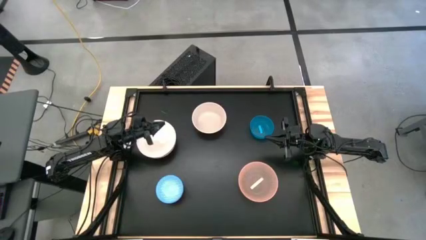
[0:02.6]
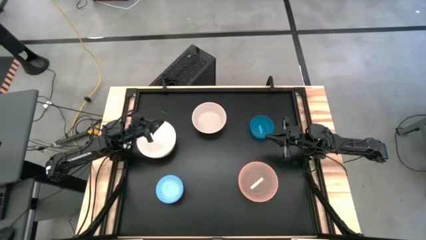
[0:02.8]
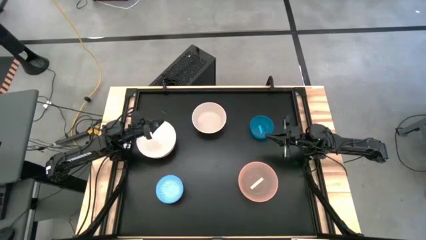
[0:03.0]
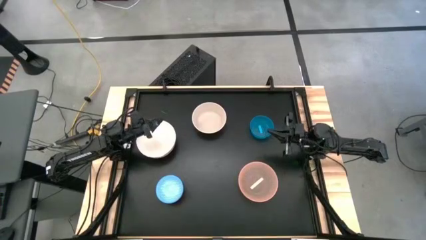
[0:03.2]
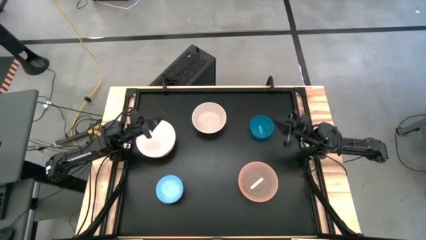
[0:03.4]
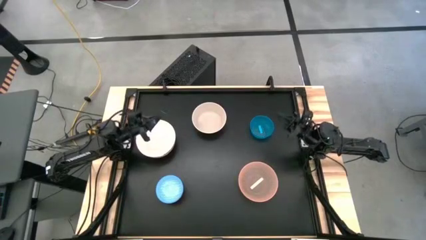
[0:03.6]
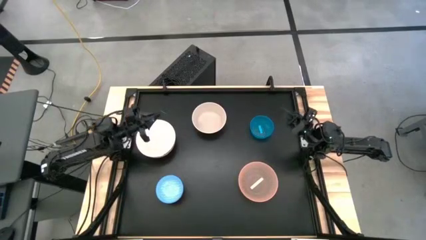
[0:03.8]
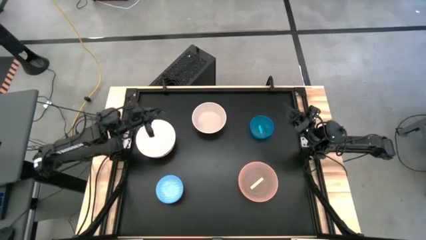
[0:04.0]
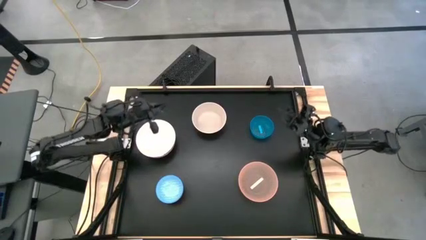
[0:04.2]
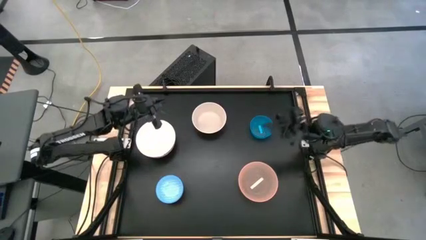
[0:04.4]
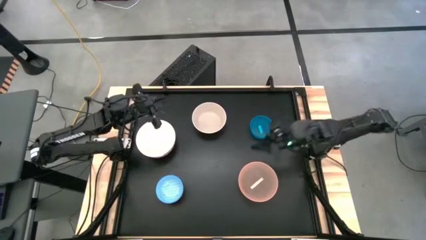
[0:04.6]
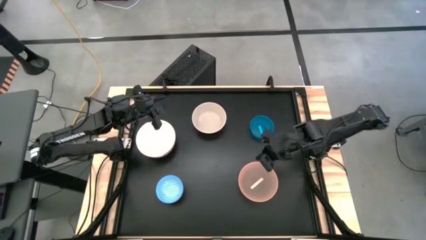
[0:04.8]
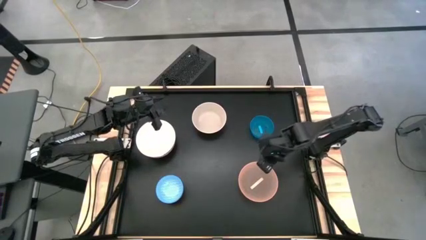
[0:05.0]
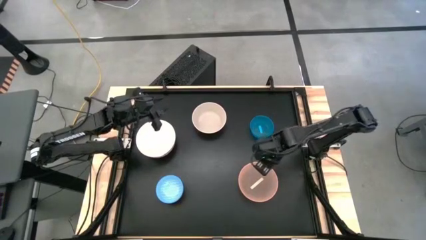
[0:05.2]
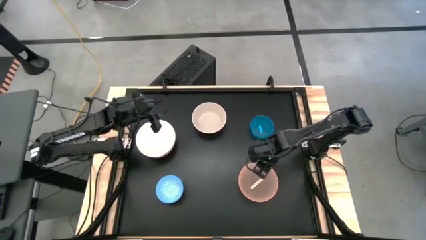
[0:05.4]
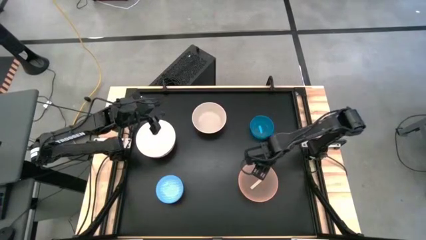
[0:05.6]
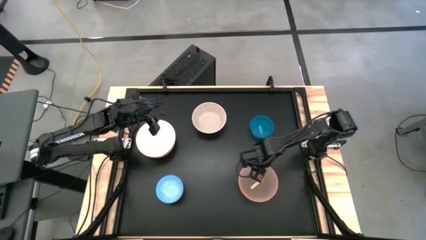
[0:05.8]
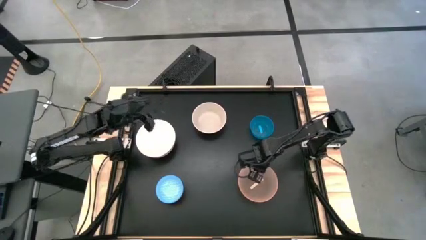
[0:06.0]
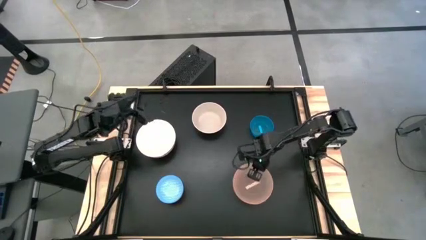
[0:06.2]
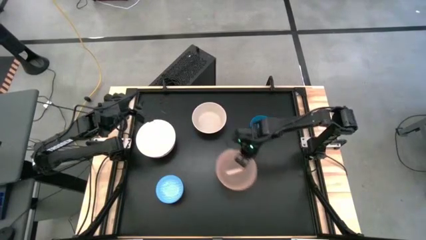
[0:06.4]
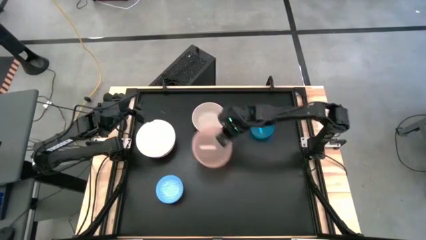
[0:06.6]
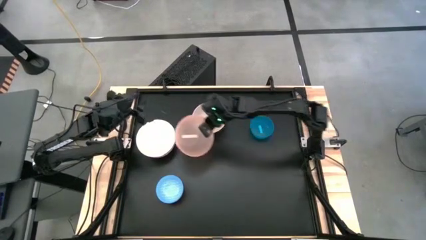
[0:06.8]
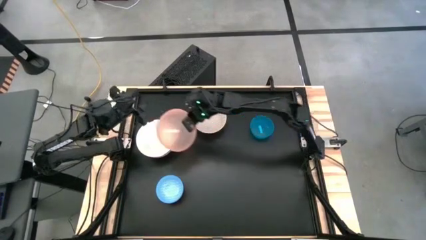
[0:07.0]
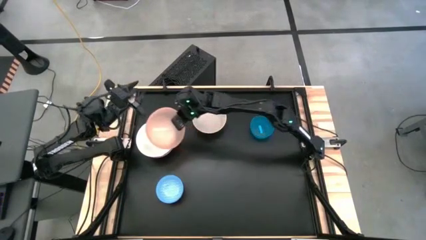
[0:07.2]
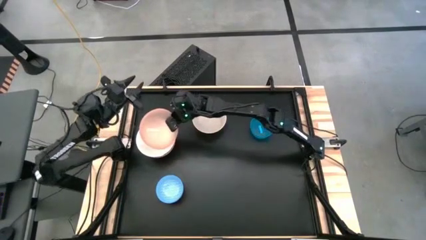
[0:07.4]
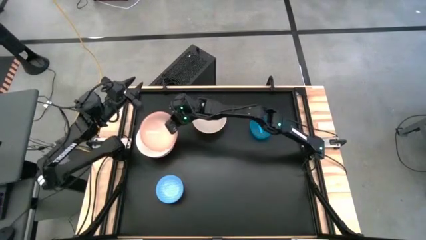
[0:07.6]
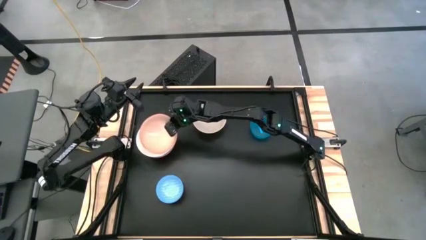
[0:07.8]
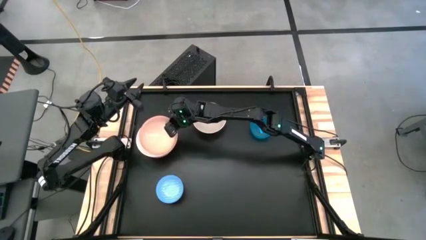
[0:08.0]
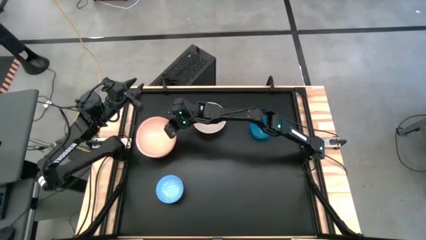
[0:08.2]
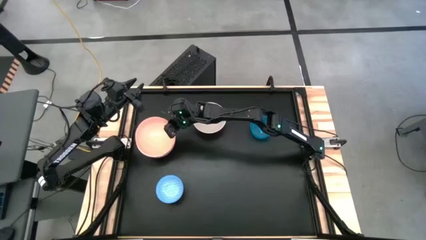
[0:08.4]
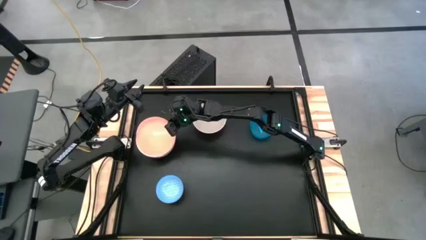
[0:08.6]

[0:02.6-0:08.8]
Stack the pink bowl on top of the white bowl

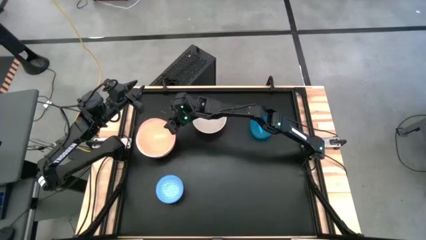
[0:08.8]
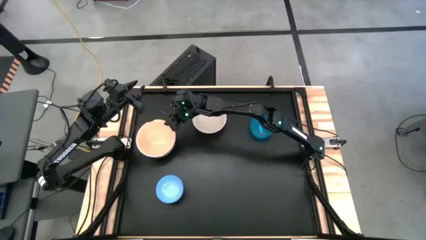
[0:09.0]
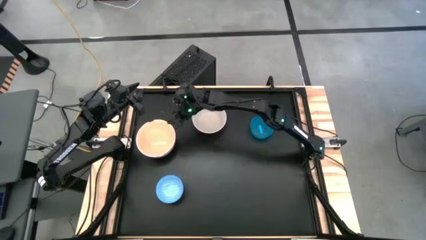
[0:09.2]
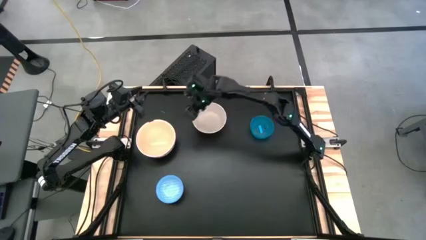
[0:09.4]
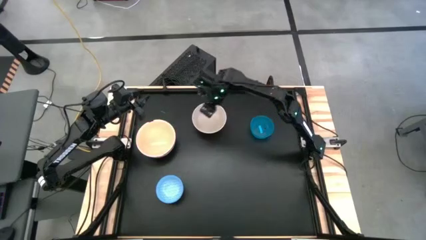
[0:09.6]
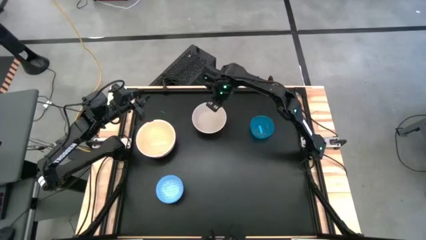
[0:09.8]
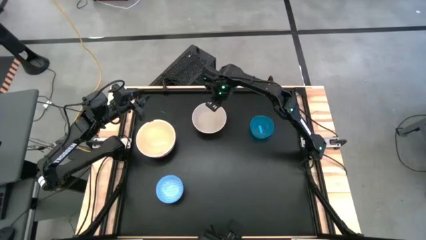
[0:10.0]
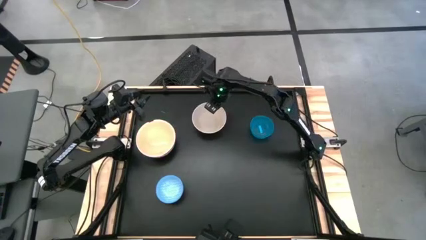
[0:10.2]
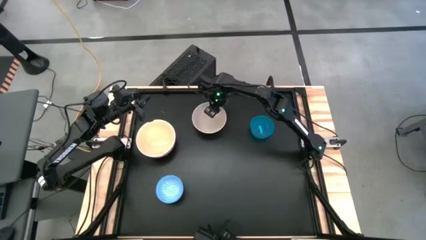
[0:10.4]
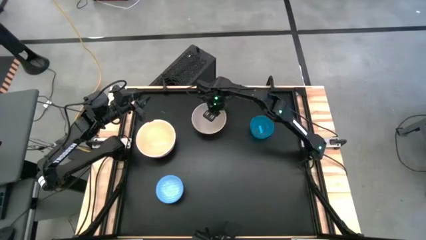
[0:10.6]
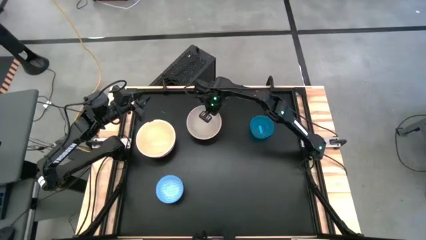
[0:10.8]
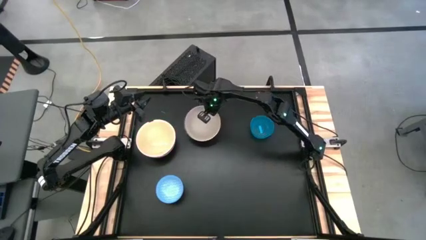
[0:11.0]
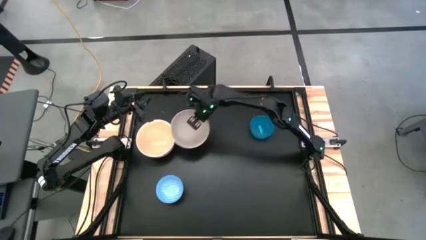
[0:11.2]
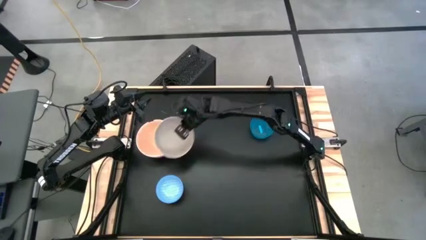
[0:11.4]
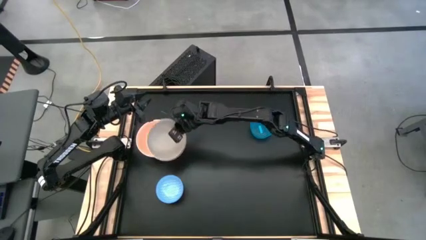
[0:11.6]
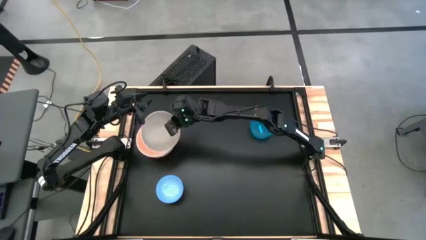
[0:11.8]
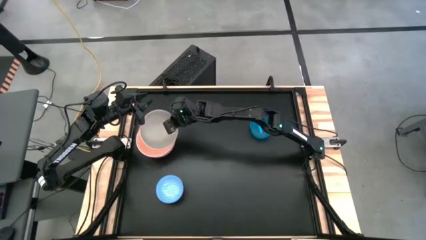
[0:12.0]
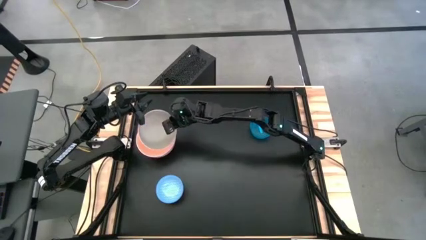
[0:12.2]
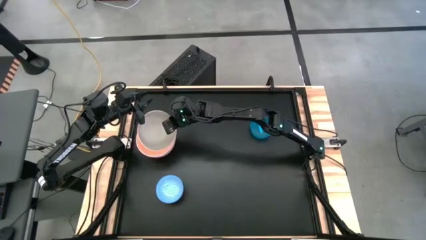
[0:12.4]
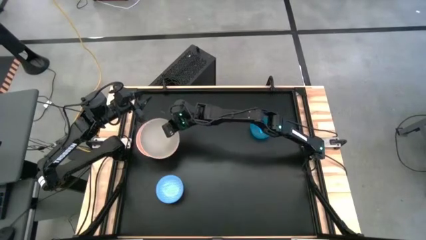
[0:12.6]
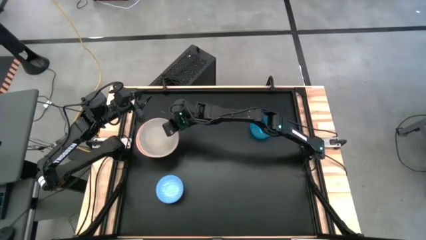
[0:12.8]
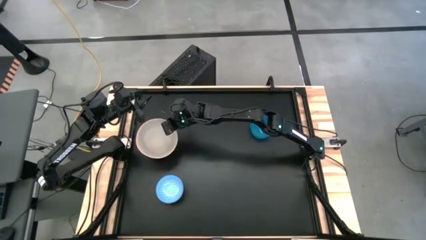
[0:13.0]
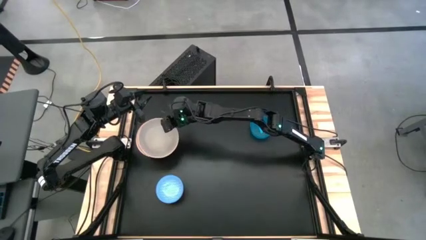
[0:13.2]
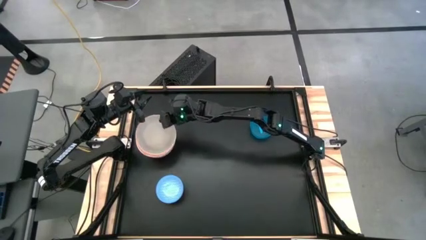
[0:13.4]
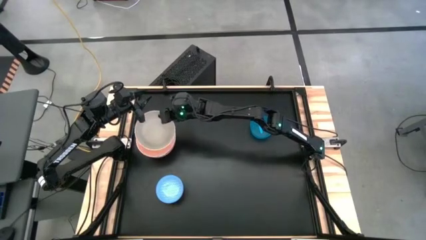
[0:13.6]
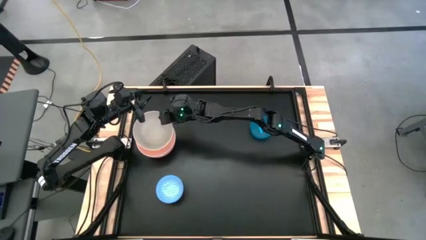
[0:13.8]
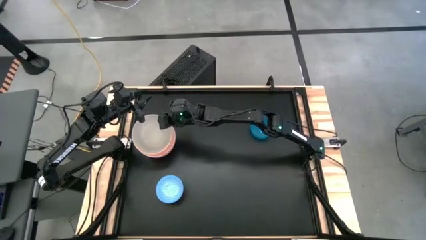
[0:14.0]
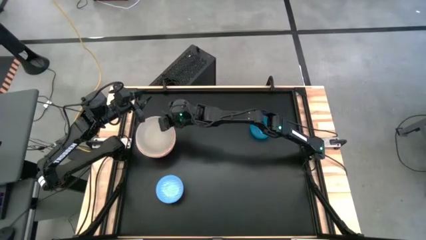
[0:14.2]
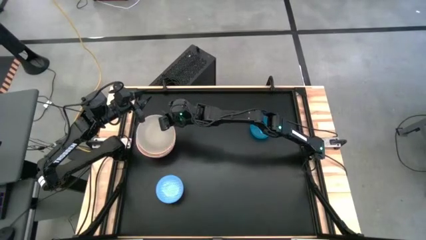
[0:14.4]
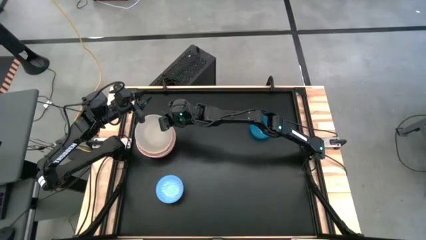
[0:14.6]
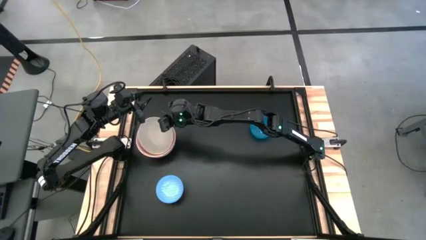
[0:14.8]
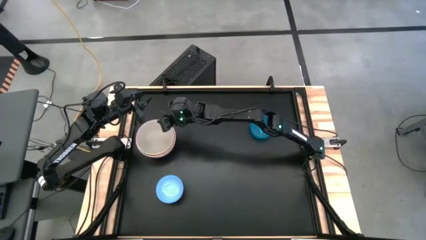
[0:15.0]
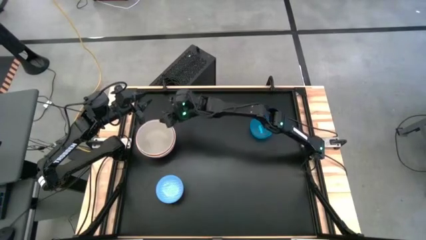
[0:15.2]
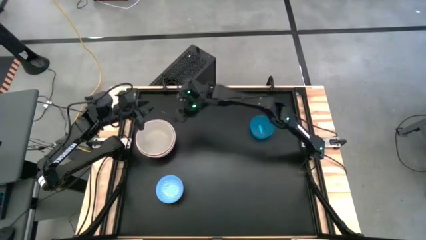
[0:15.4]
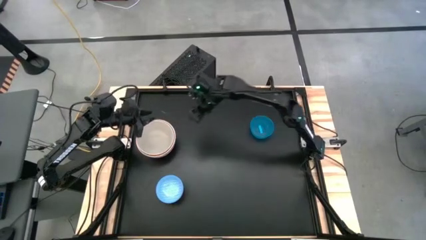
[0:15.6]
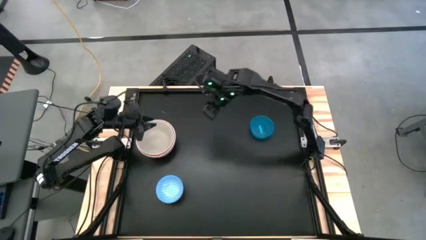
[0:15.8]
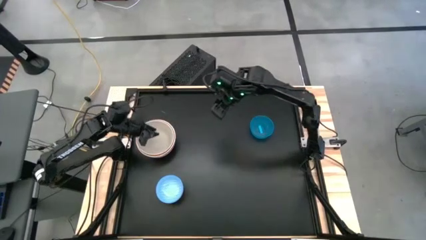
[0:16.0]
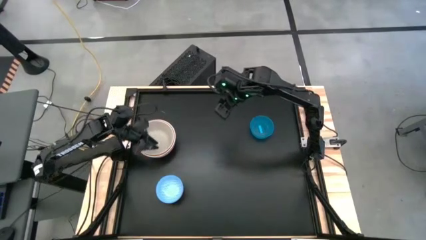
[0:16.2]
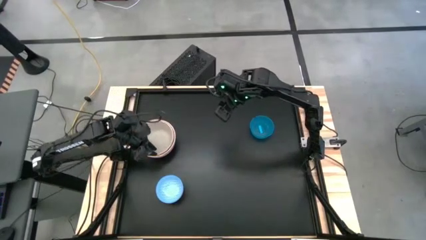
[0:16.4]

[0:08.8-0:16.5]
Stack the gray bowl on top of the pink bowl

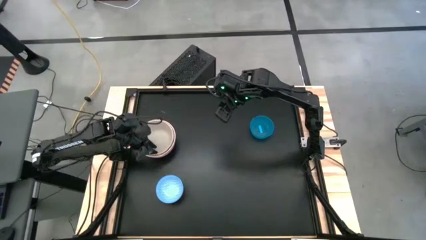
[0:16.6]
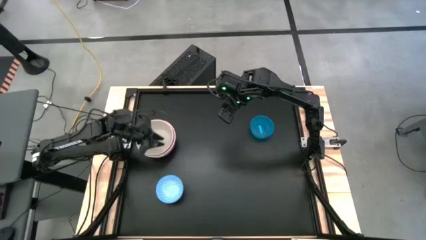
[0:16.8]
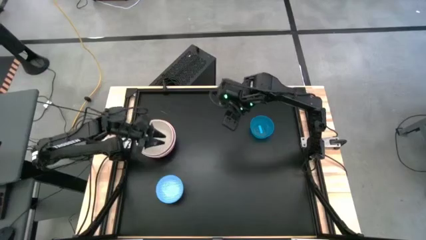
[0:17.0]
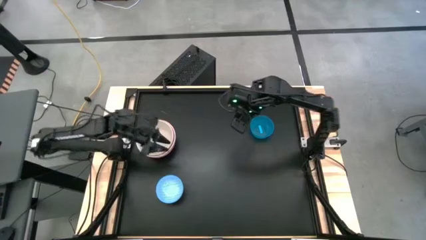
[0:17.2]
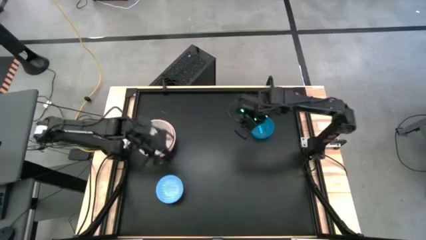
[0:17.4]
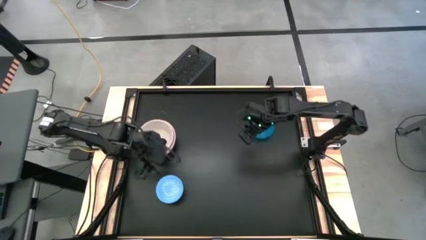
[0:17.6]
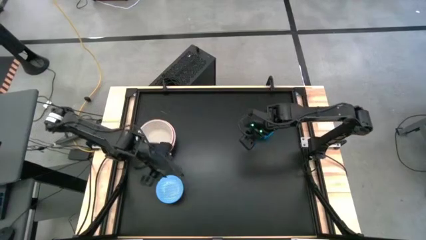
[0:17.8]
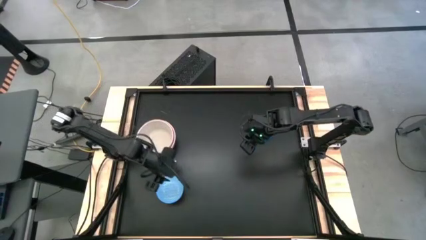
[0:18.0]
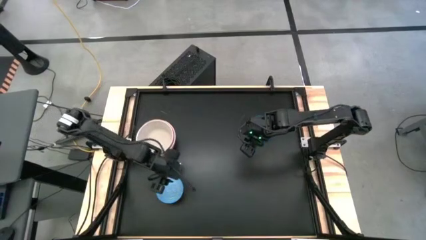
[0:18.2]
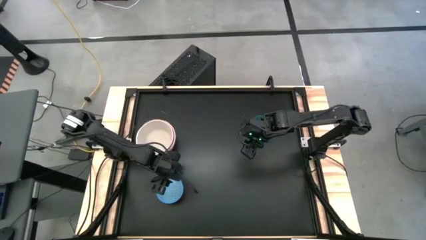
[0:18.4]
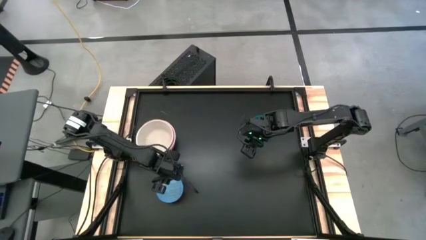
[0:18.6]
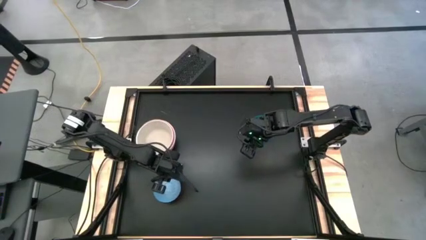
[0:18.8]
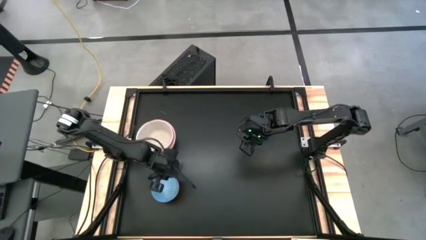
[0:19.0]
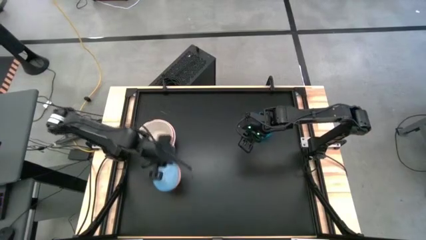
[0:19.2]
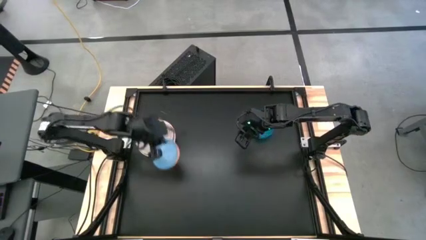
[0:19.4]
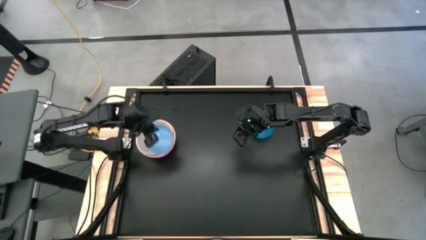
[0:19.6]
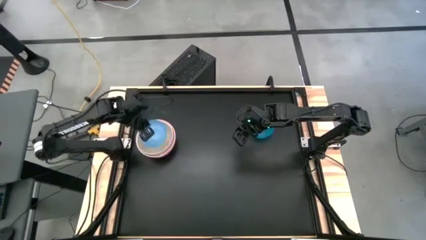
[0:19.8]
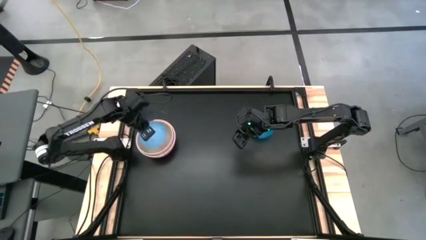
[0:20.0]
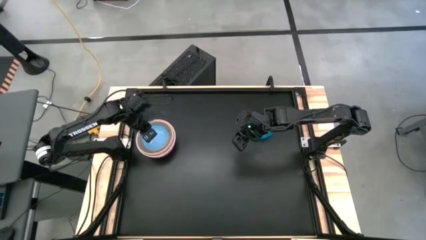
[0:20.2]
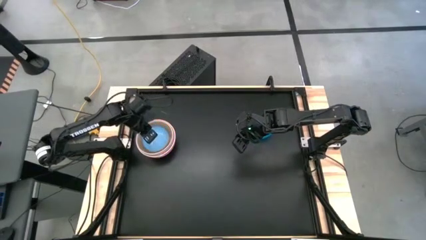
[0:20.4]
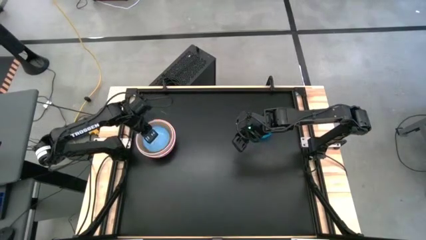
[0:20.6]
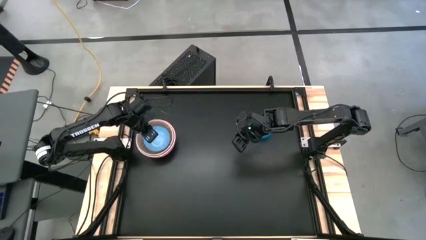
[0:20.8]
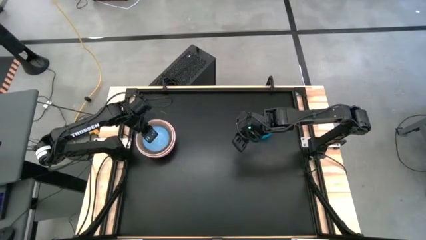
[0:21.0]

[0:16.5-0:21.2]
Stack the blue patterned bowl on top of the gray bowl
